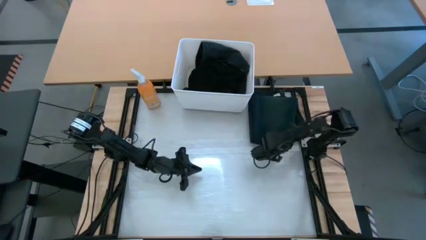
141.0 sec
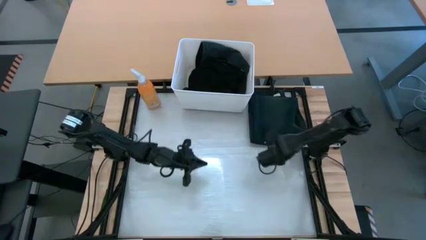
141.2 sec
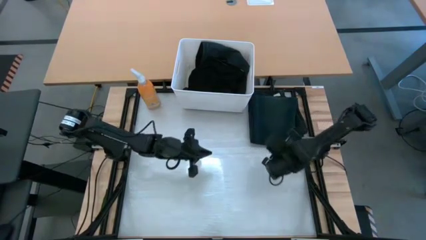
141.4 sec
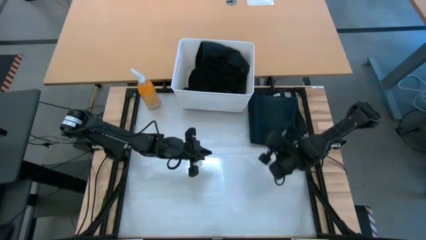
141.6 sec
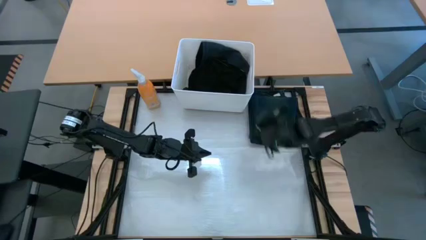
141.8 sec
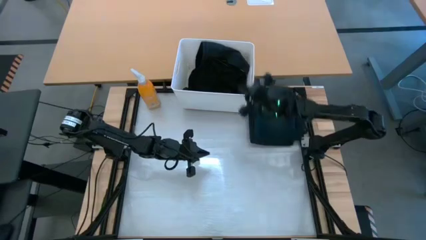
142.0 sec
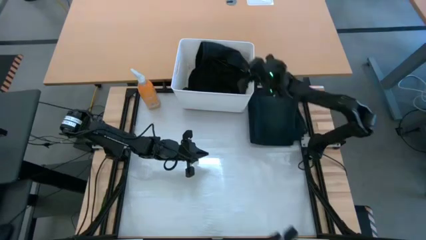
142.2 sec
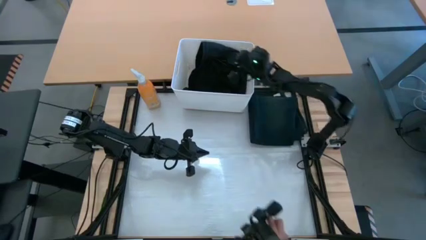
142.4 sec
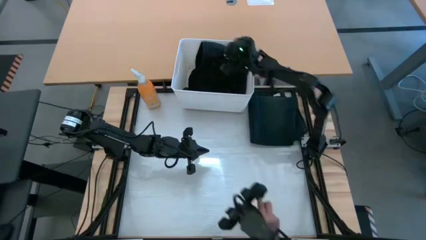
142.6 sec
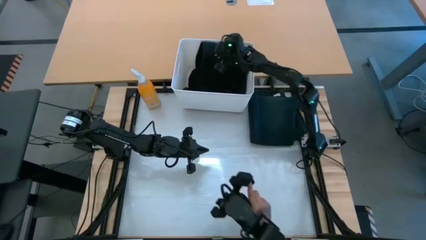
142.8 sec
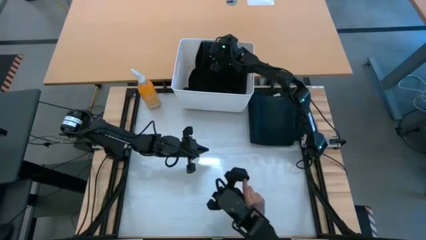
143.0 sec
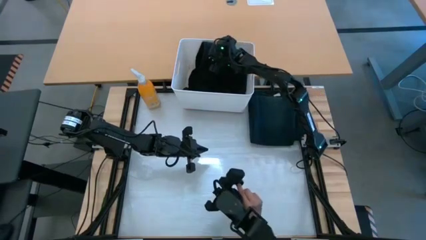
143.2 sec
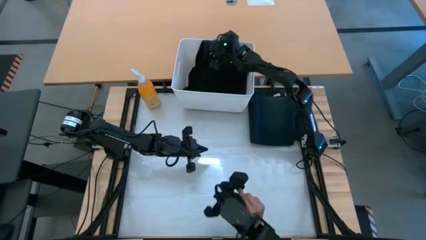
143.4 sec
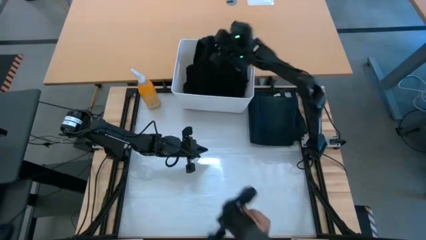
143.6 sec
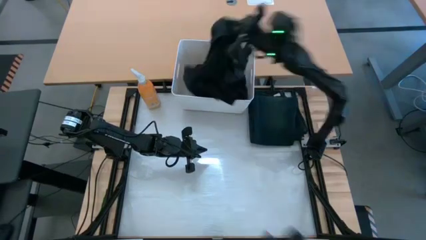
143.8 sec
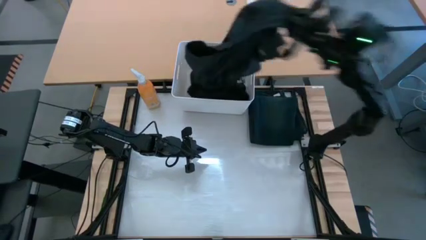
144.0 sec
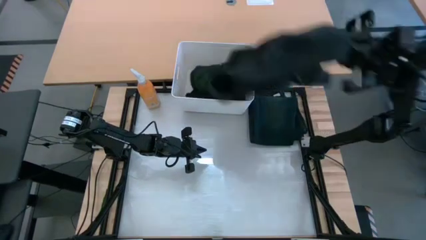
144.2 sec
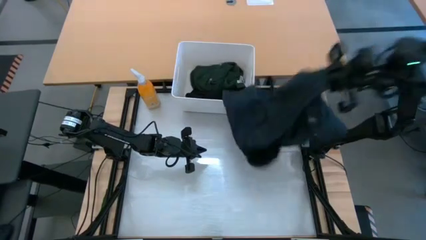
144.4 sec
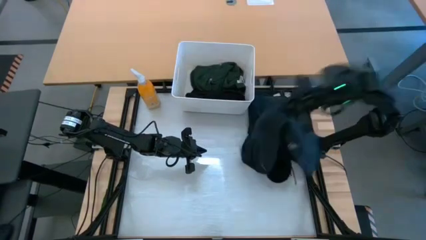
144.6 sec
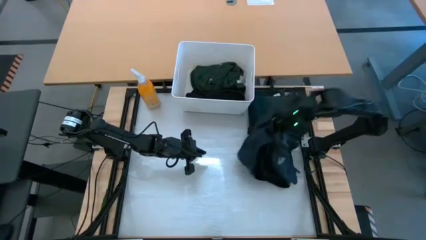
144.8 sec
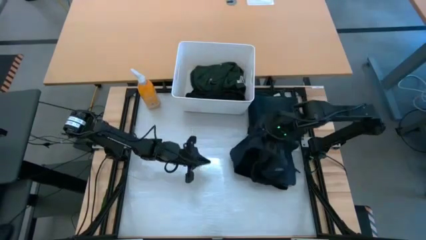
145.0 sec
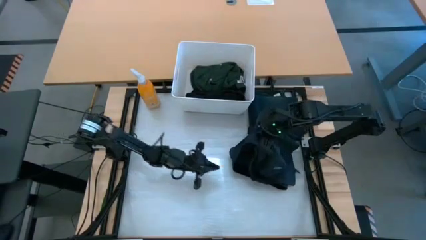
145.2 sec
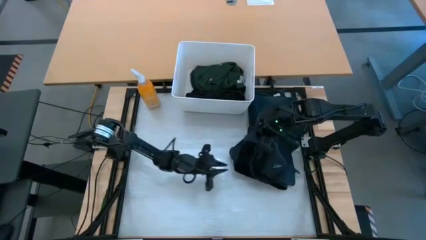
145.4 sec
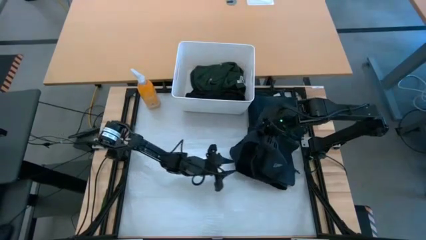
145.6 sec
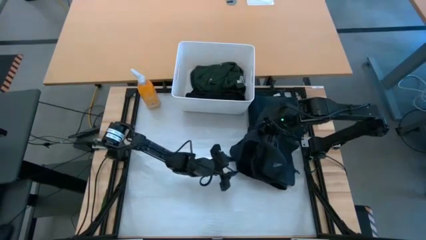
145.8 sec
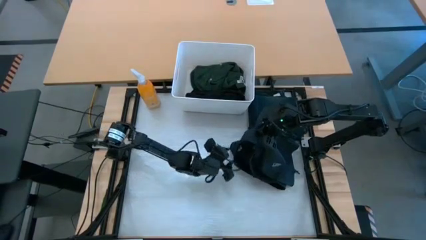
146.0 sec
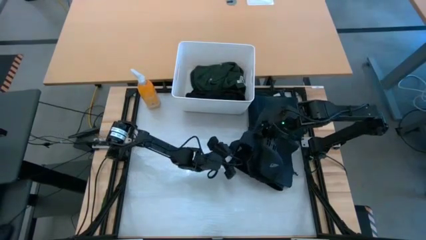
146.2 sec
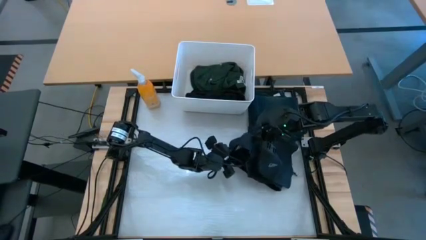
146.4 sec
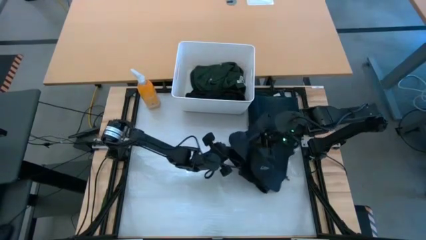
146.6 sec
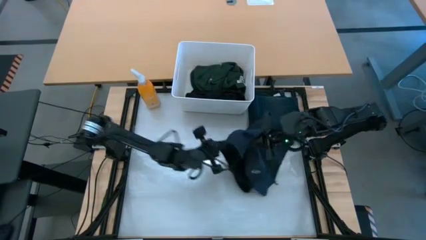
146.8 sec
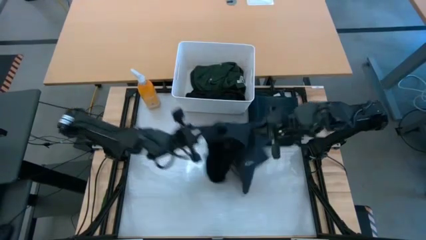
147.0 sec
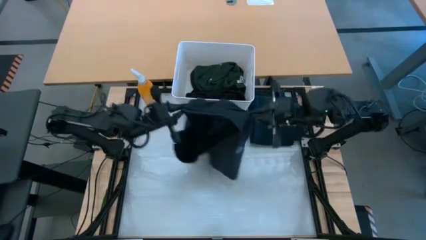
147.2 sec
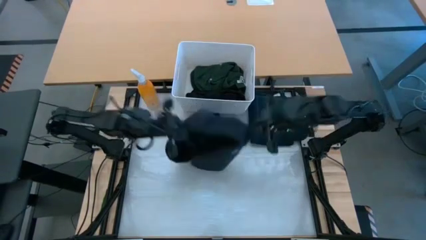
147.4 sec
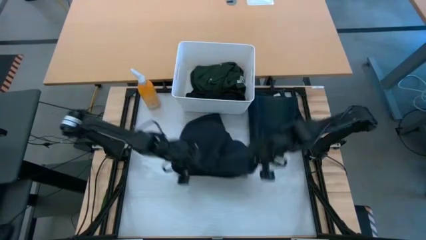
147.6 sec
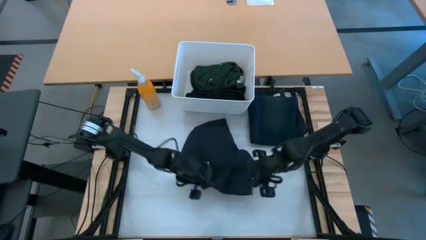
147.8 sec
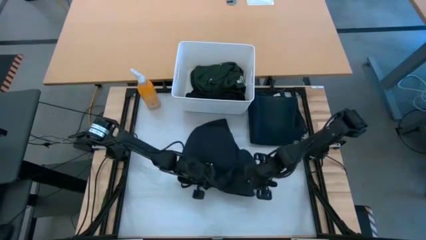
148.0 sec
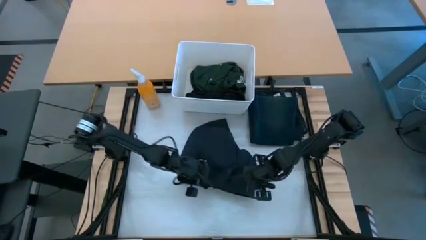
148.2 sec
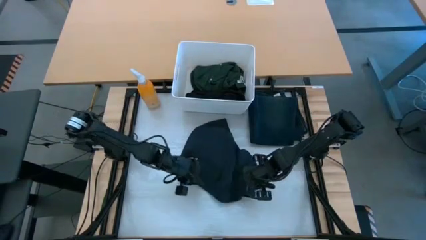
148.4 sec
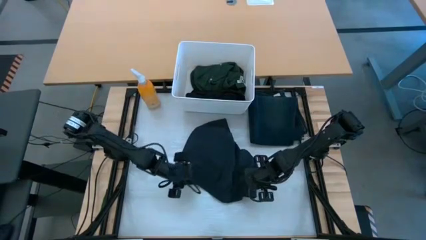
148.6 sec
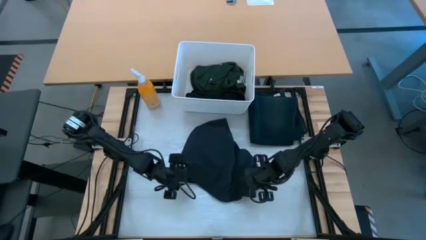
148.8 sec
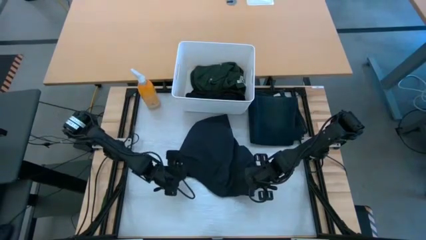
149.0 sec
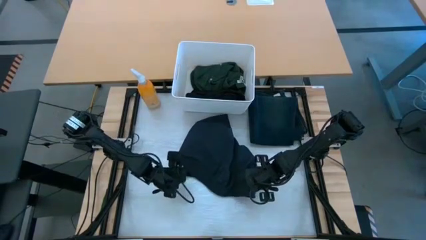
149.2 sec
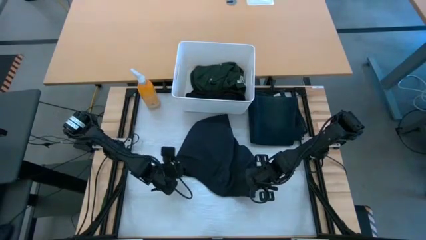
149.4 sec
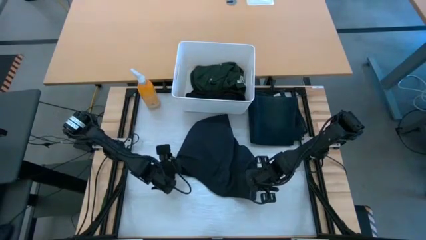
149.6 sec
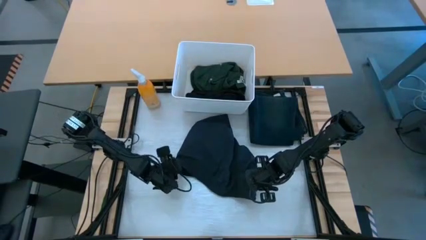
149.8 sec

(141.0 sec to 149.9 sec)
Task: Fold laundry
Remove the black shorts from the white bin

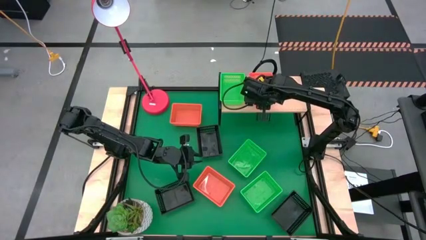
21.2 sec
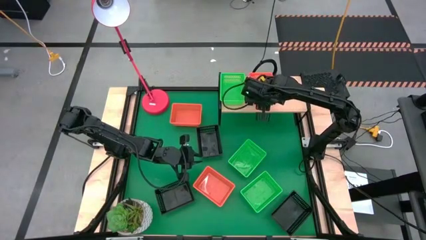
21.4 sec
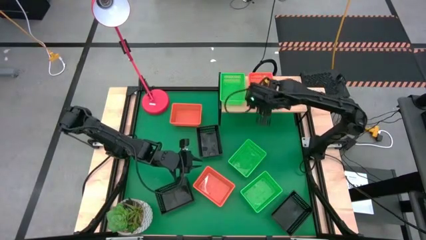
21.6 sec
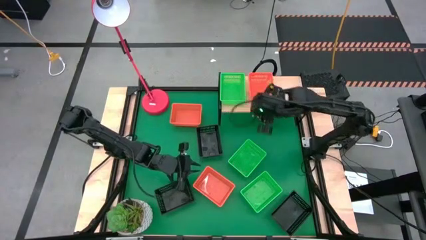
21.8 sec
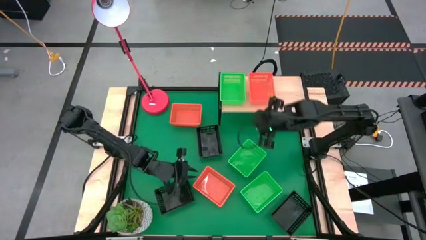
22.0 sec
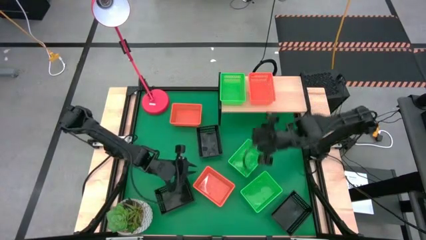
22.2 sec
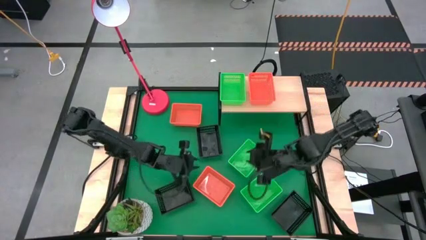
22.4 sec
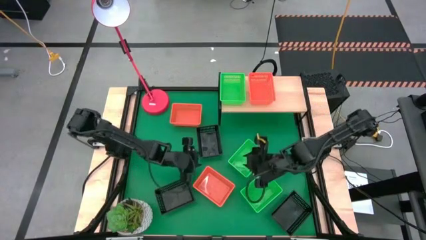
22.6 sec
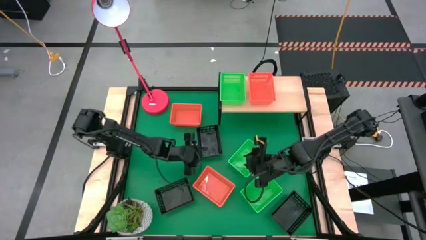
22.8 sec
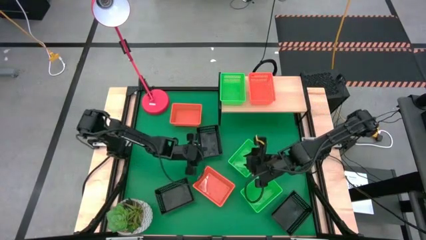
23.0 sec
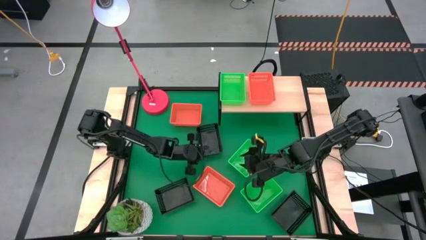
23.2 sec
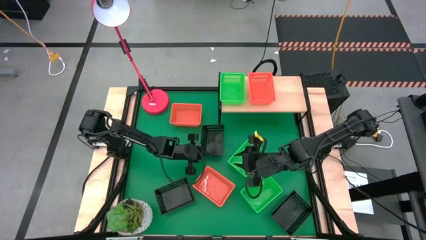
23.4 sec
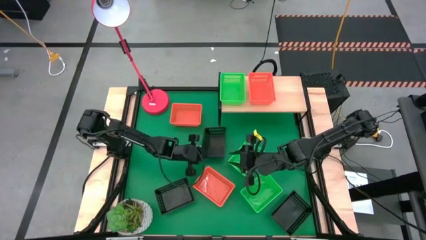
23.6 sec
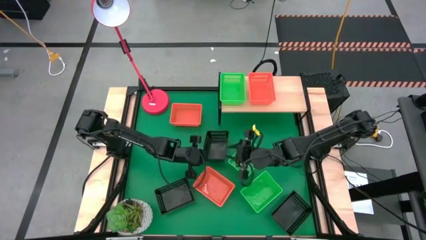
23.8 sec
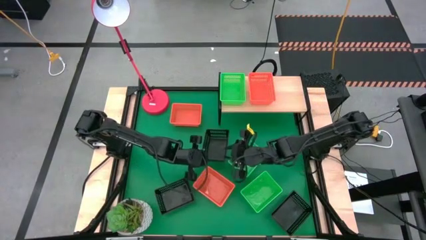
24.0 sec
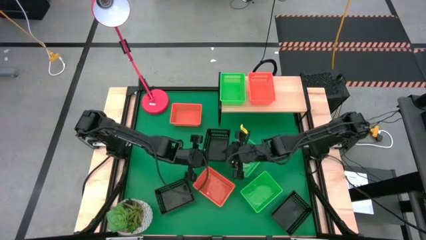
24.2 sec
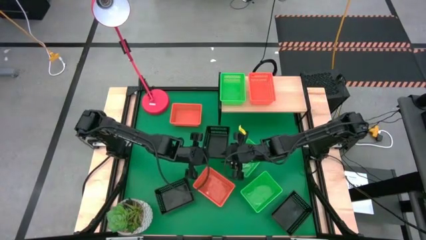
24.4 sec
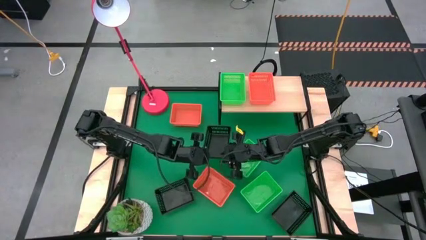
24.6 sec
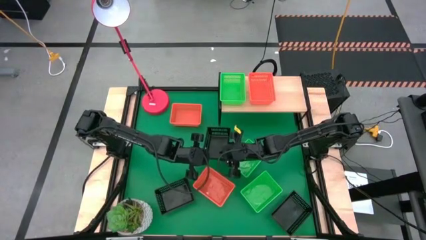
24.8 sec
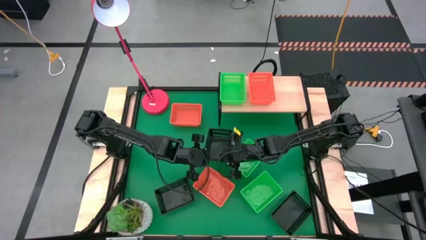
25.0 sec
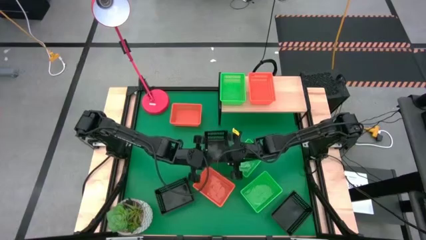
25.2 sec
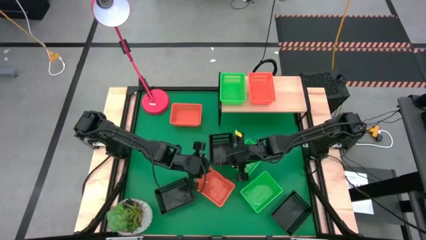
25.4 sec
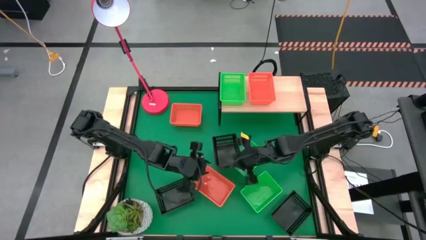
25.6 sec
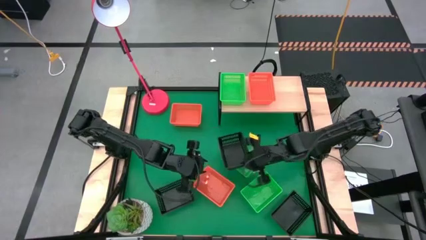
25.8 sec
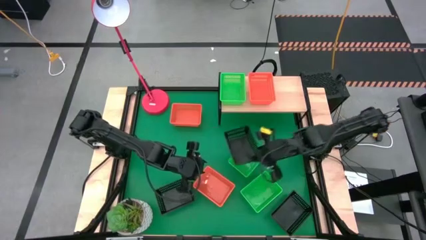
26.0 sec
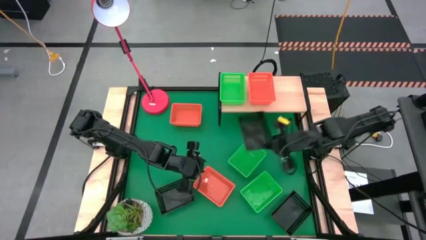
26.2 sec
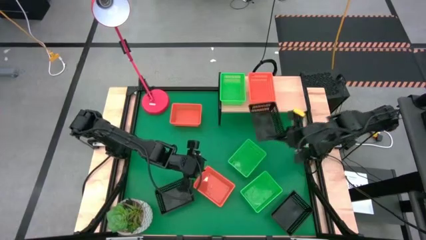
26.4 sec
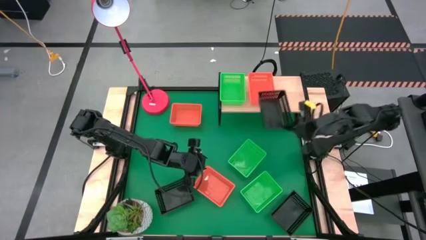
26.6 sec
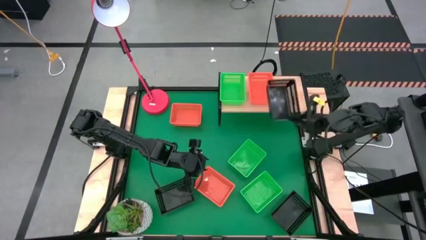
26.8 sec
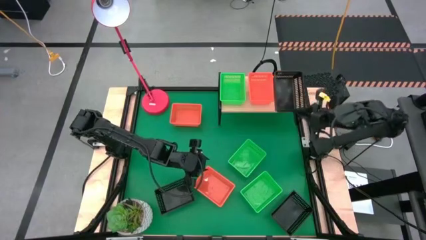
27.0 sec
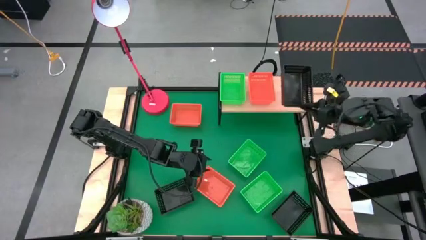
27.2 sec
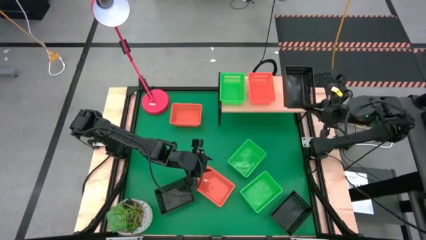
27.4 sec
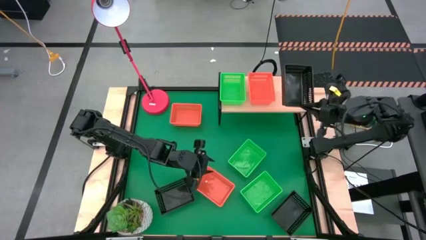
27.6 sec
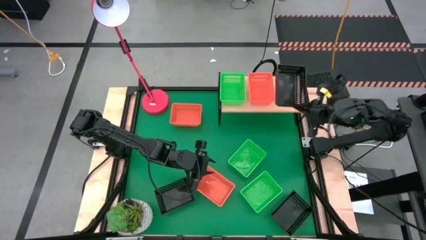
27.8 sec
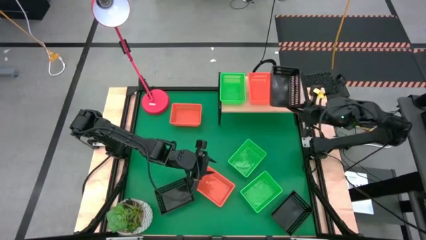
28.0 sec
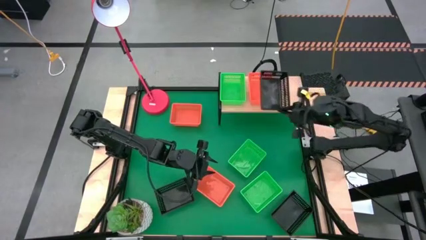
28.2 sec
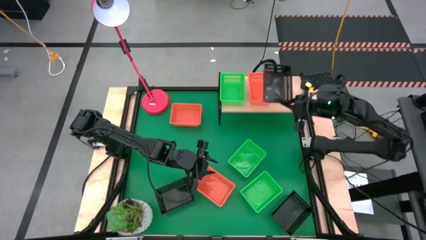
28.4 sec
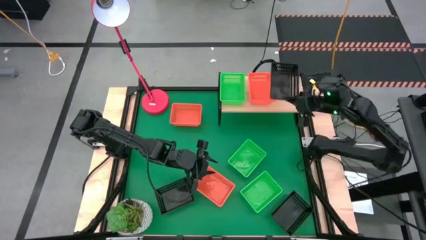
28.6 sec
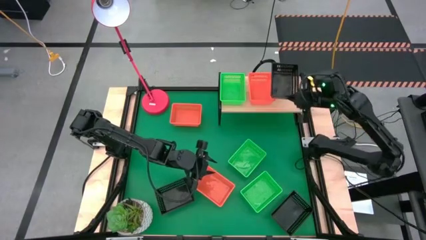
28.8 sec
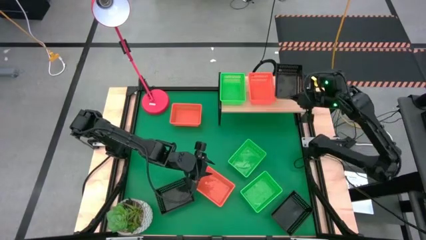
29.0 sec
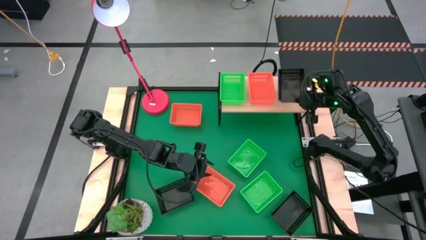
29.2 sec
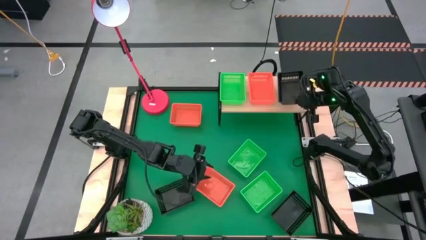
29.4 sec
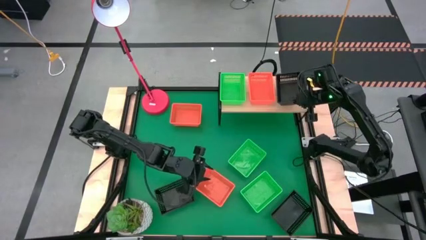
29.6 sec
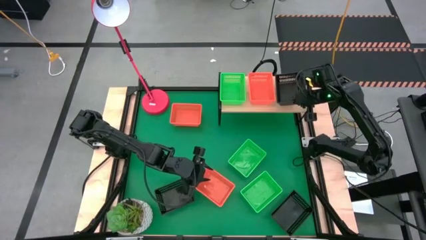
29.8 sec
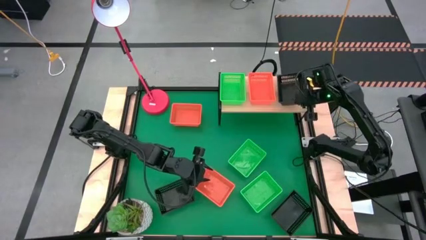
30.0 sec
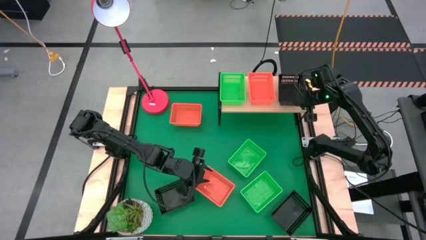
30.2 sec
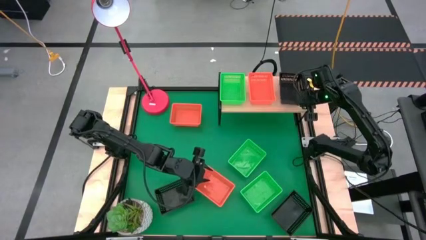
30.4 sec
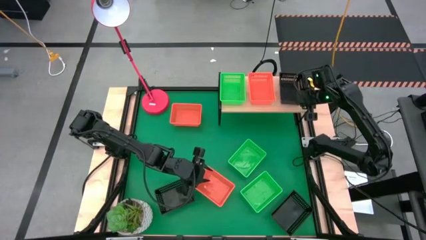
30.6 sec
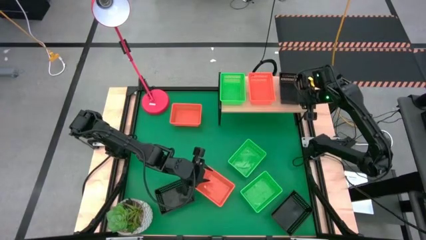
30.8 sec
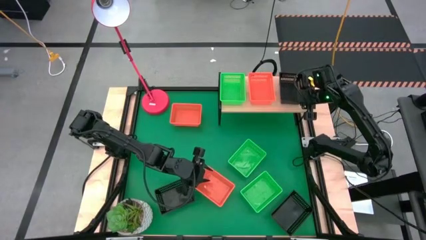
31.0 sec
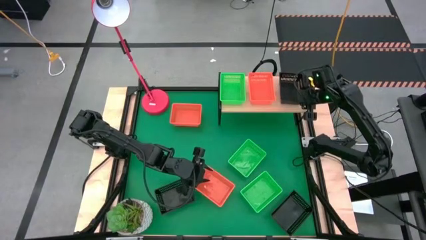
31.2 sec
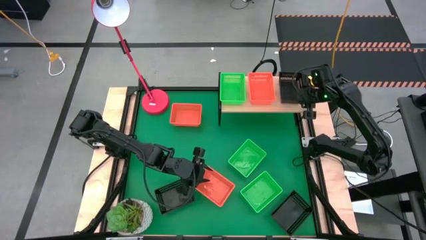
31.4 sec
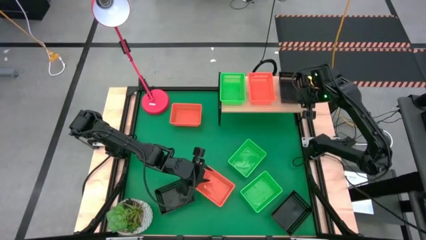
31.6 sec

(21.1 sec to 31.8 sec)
Task: Stack baskets on shelf by color
Put the top black basket on the shelf
